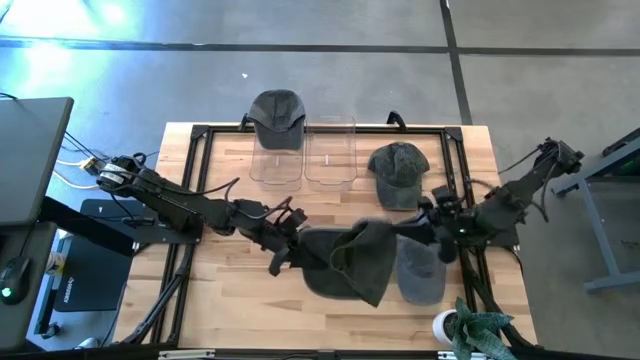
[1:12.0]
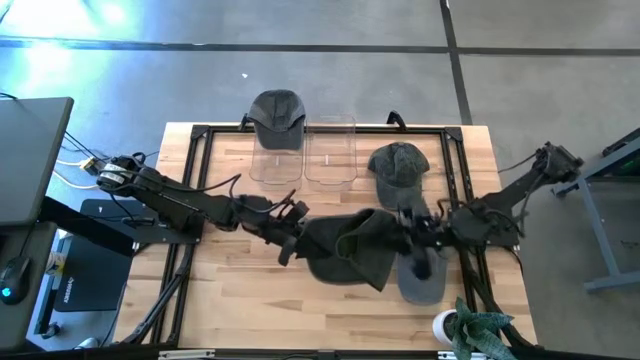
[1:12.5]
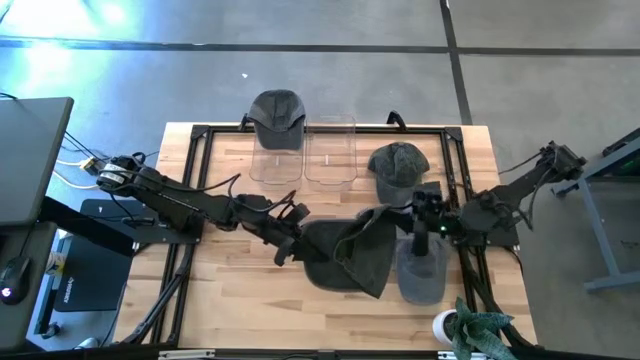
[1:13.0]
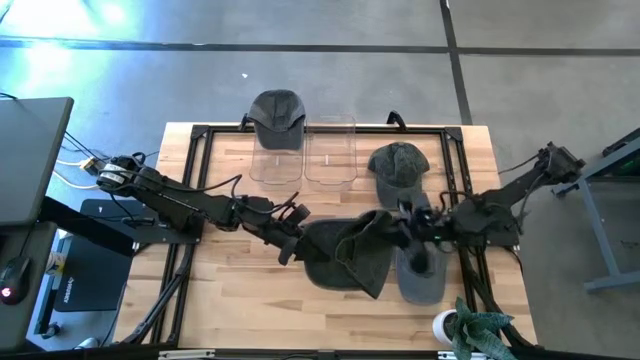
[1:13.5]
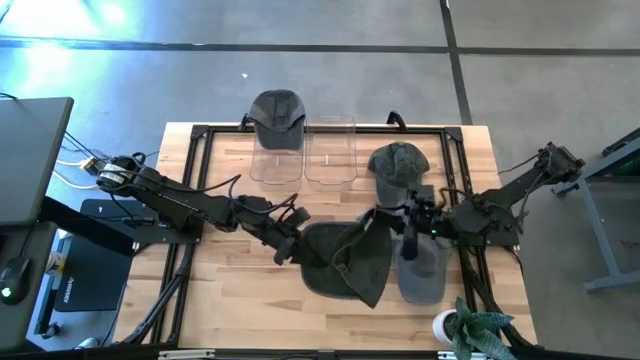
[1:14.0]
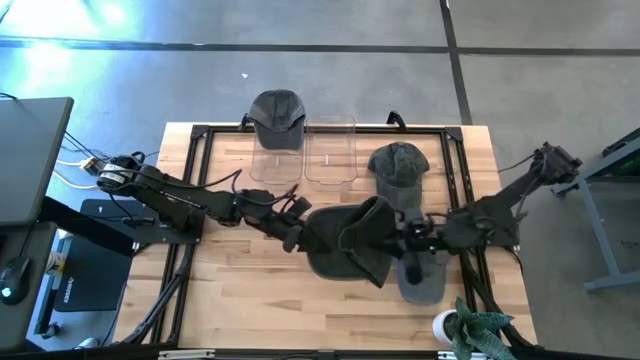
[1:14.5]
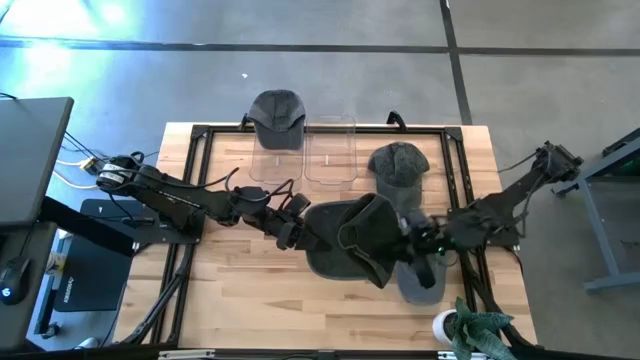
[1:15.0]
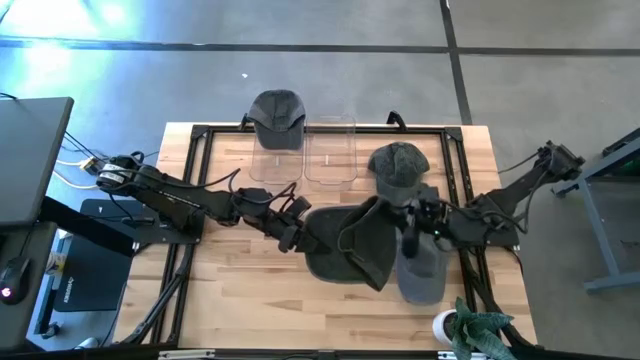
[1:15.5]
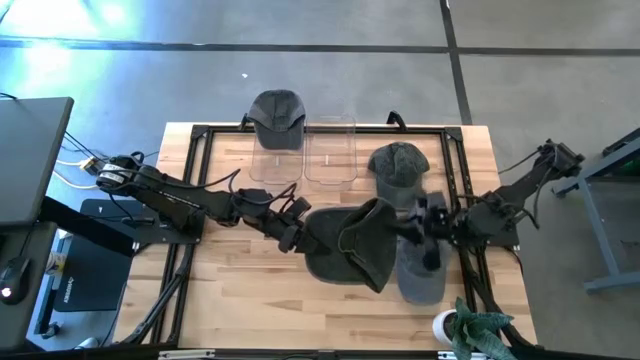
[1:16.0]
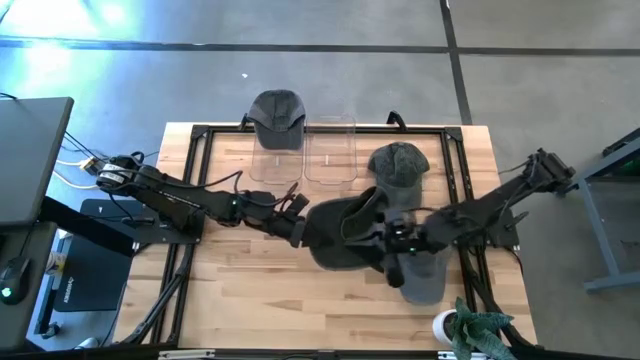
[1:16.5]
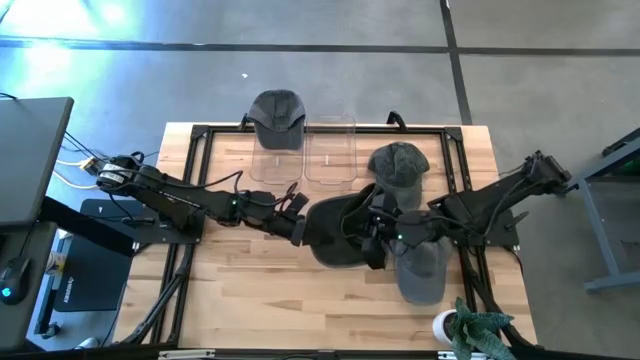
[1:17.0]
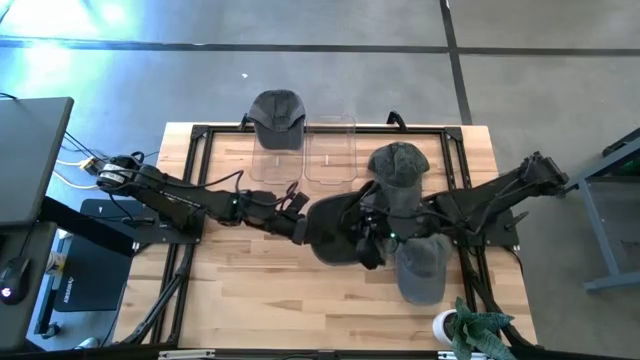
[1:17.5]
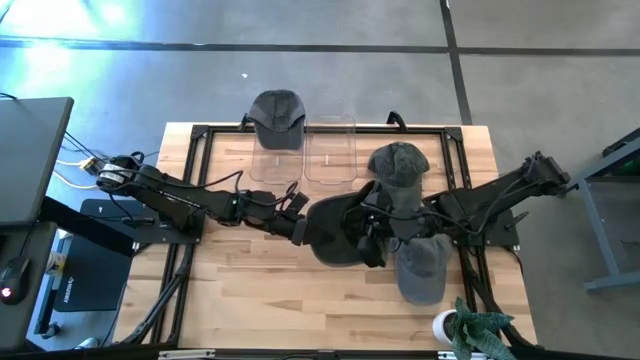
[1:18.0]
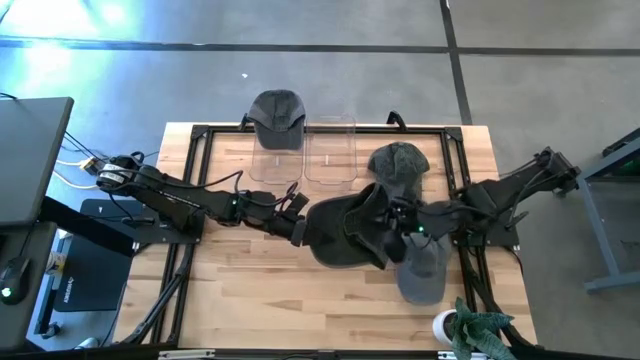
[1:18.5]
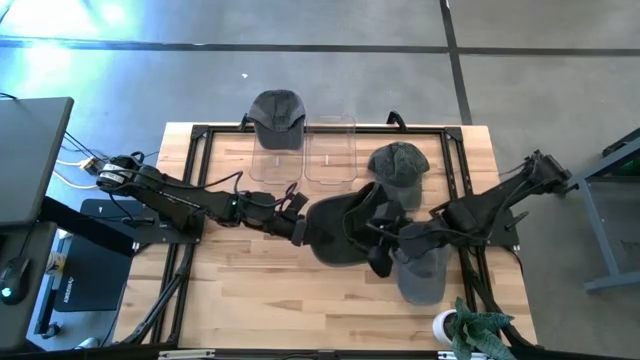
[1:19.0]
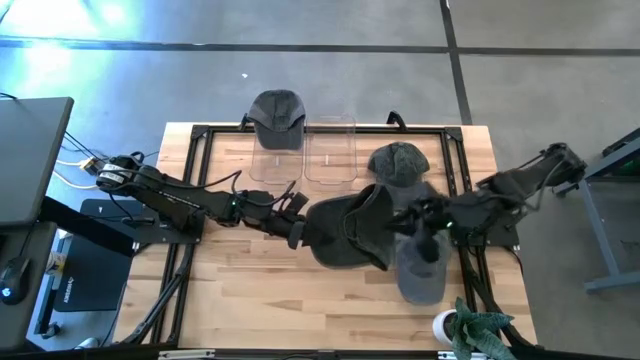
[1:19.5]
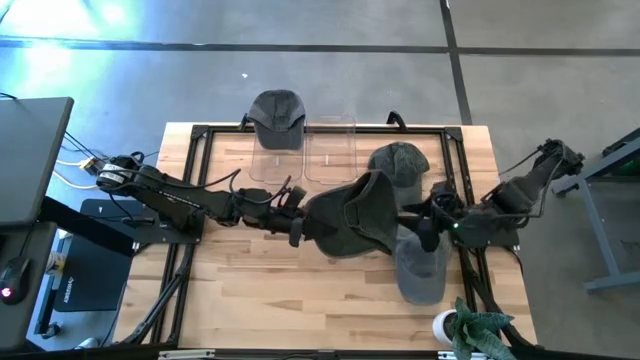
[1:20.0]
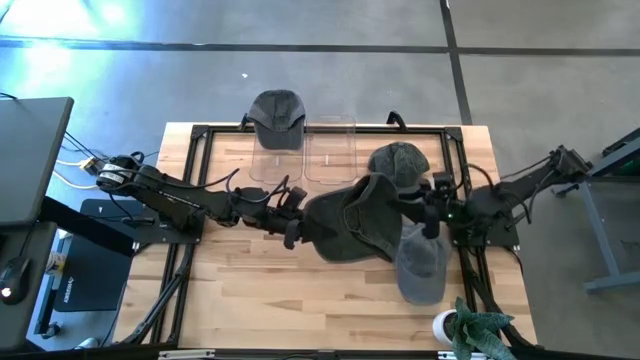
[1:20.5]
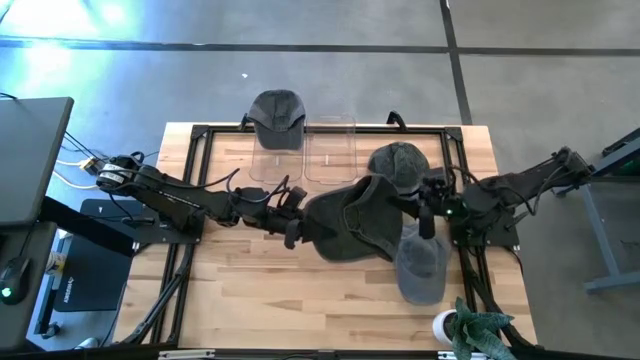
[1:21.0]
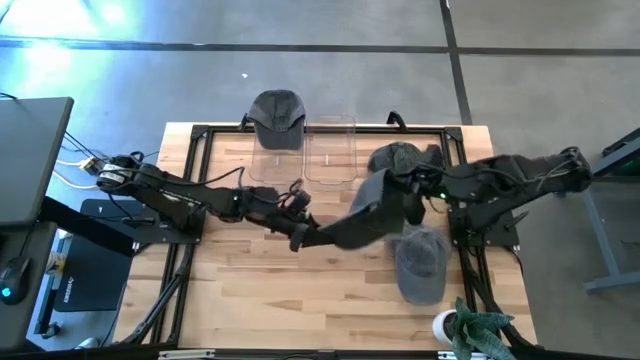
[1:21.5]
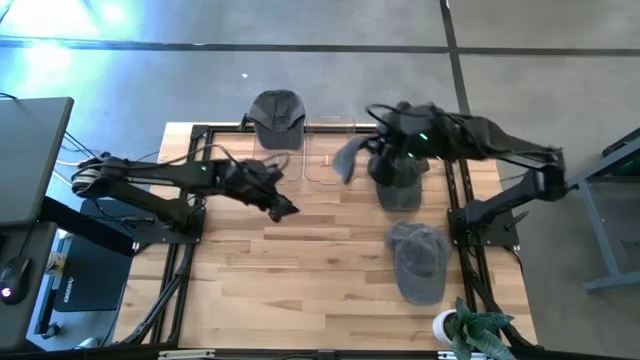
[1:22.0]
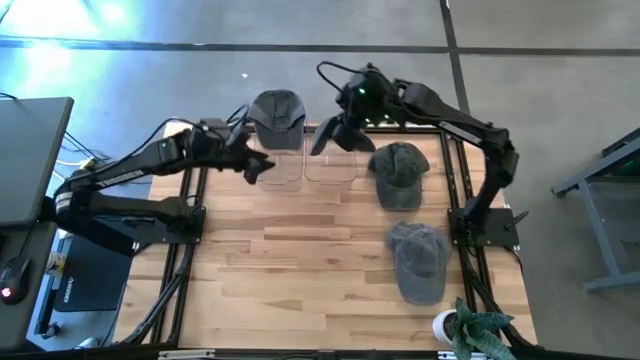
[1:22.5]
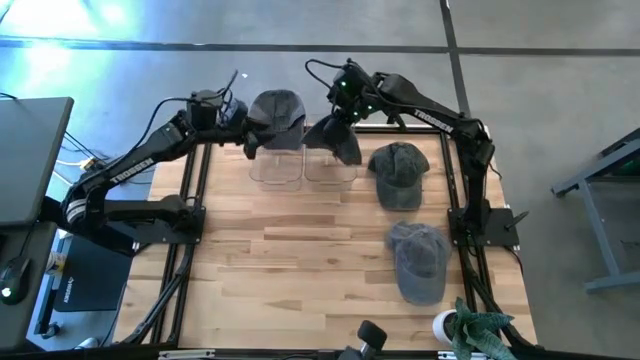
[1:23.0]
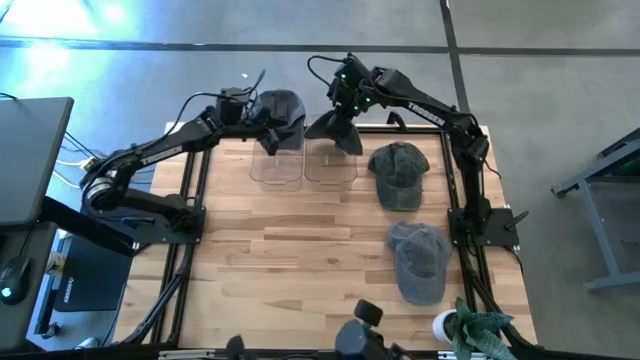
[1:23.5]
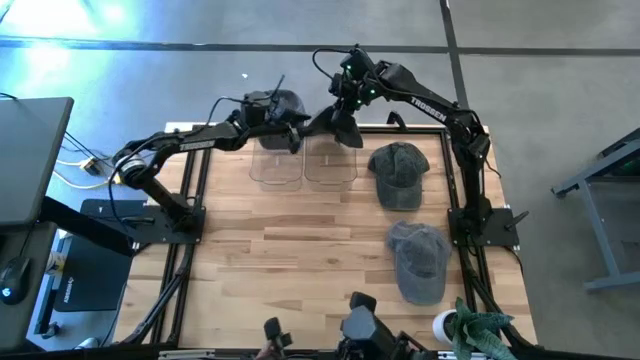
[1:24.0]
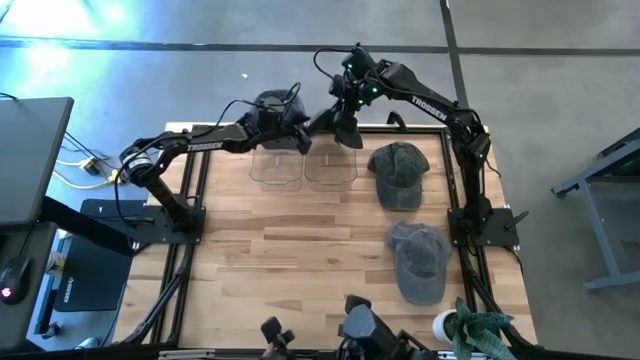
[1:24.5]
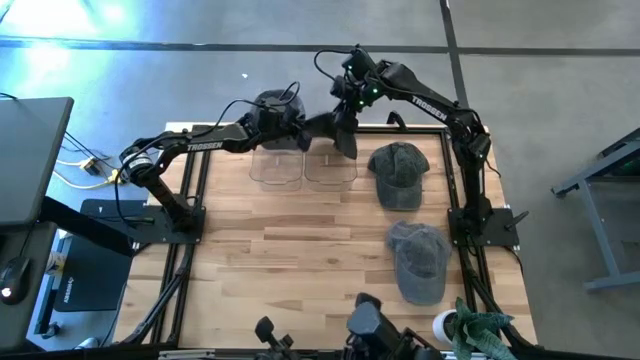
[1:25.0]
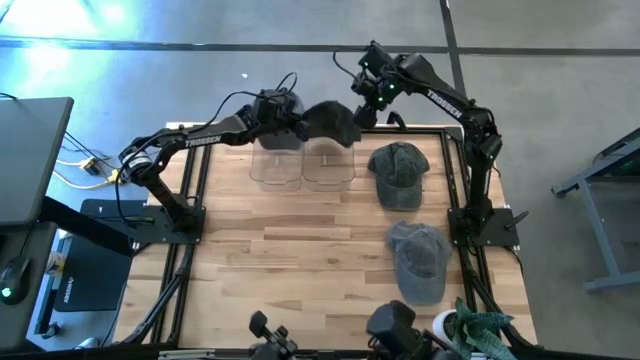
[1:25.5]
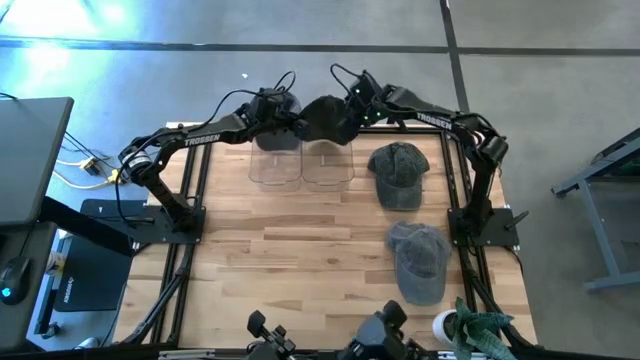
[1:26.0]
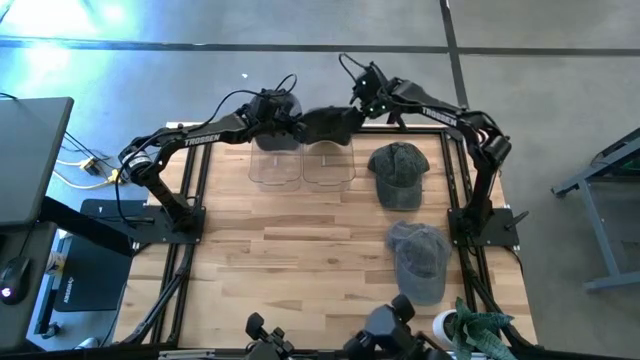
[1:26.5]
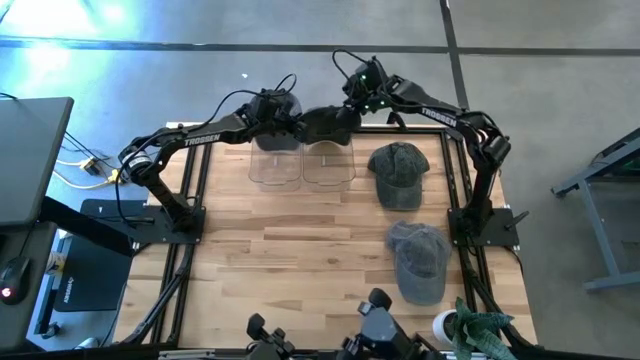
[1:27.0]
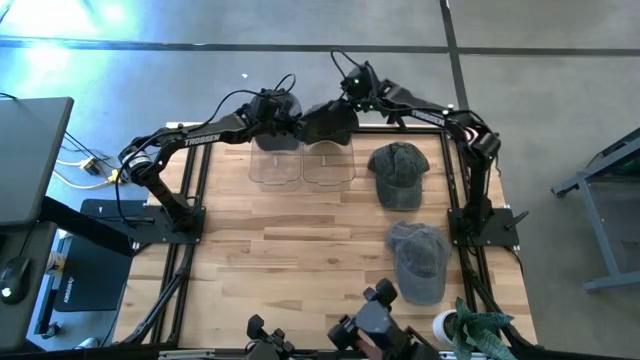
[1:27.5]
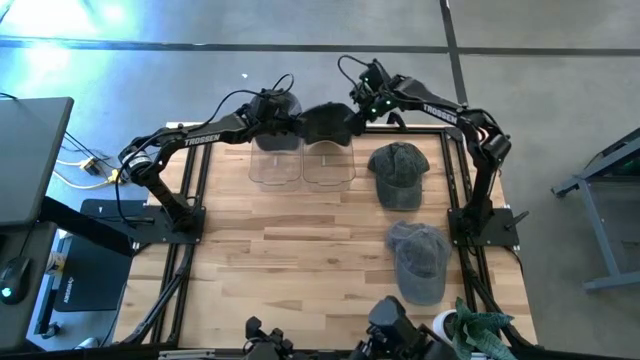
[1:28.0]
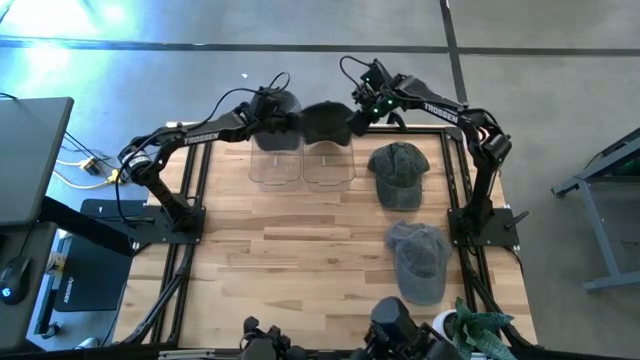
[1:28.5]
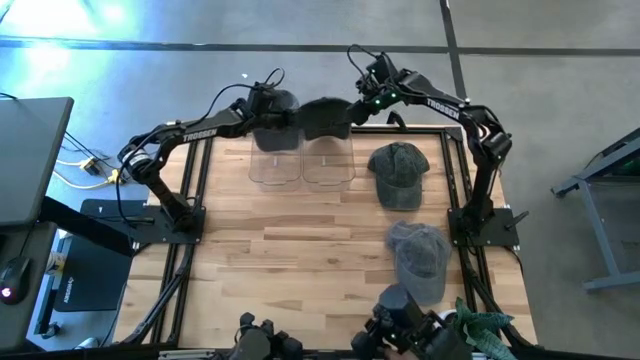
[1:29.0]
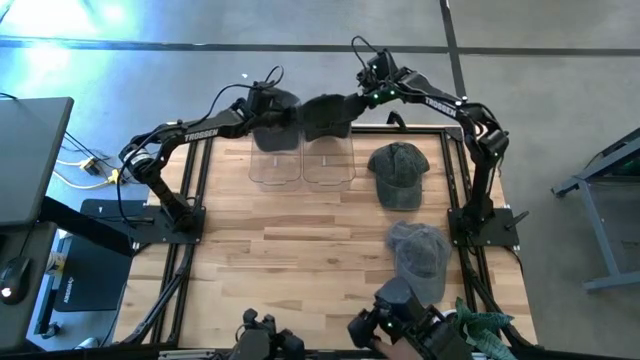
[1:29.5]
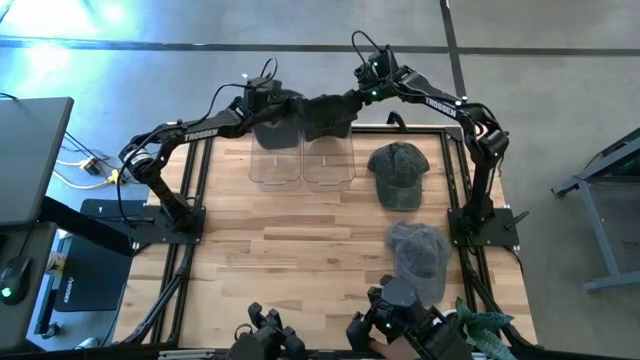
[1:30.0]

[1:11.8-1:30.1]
Task: Pick & Place hat
Put the bottom black cap into the right transparent bin
